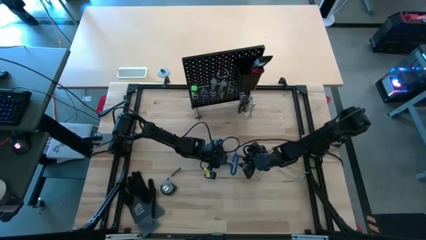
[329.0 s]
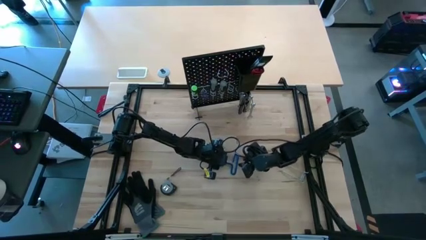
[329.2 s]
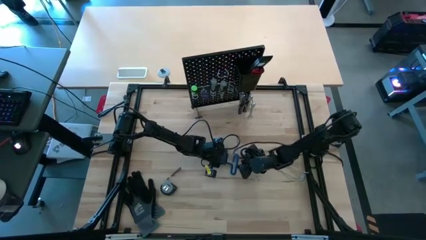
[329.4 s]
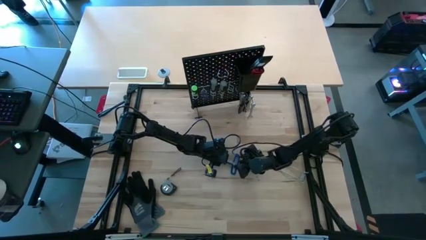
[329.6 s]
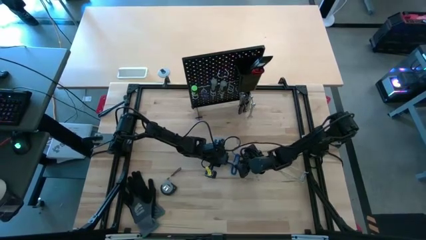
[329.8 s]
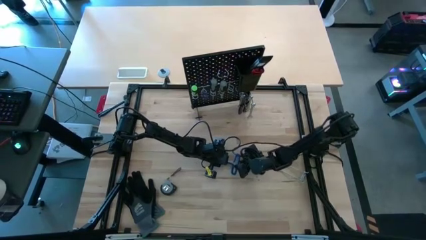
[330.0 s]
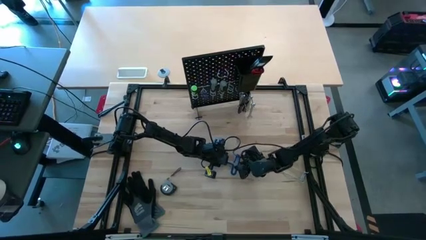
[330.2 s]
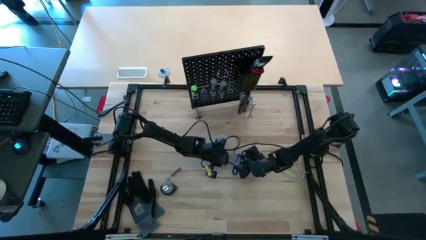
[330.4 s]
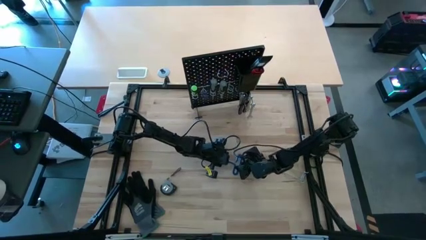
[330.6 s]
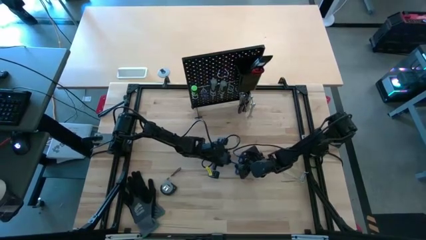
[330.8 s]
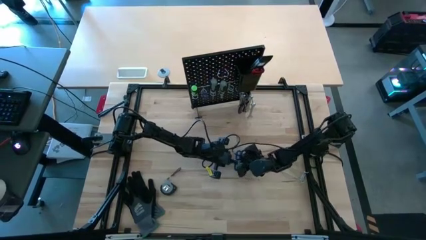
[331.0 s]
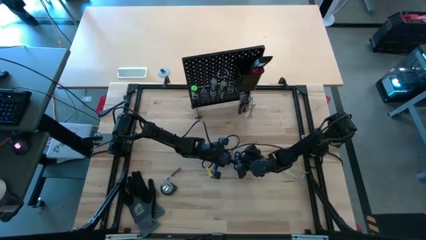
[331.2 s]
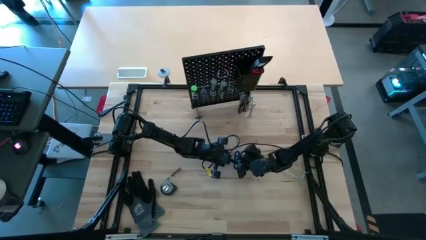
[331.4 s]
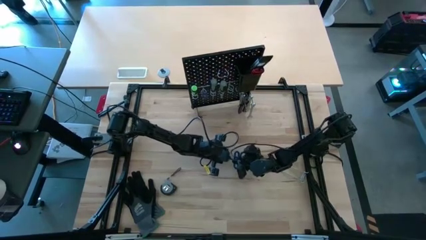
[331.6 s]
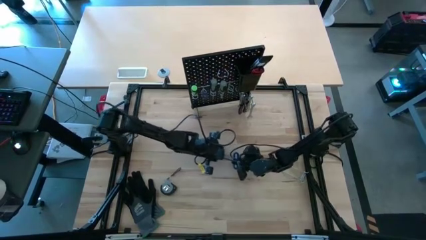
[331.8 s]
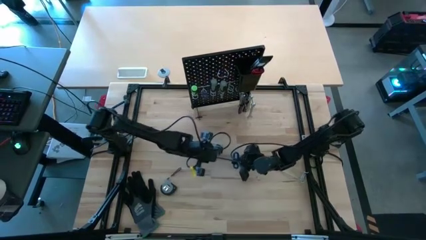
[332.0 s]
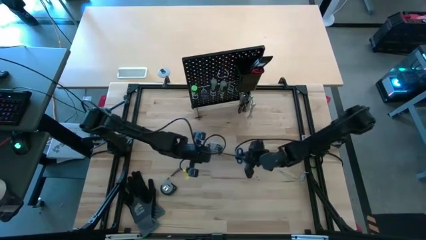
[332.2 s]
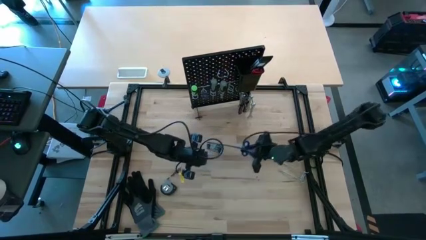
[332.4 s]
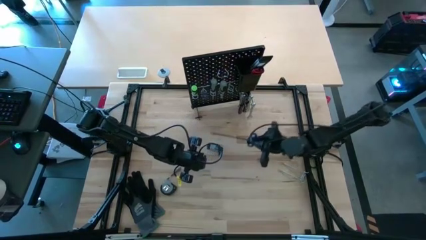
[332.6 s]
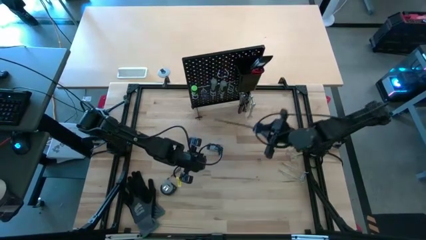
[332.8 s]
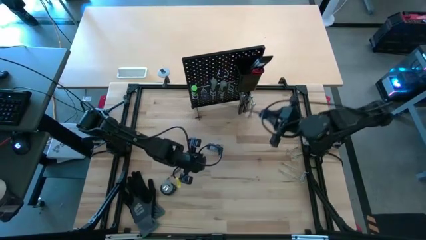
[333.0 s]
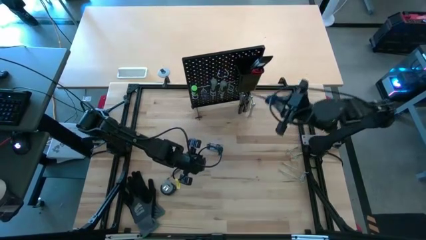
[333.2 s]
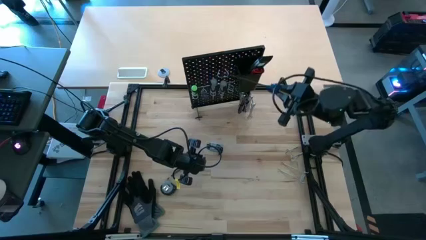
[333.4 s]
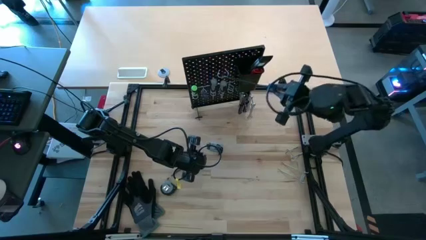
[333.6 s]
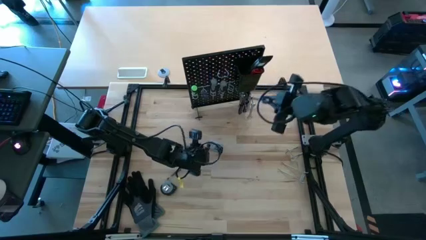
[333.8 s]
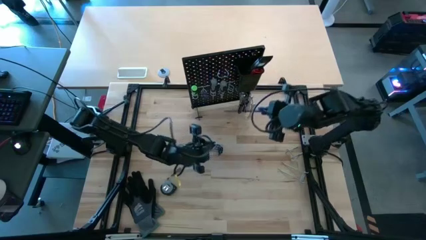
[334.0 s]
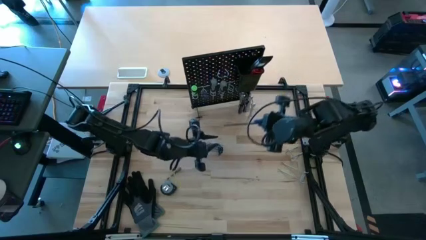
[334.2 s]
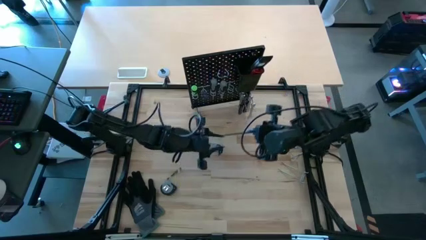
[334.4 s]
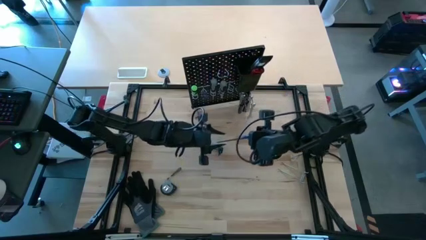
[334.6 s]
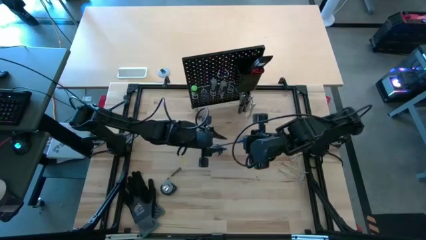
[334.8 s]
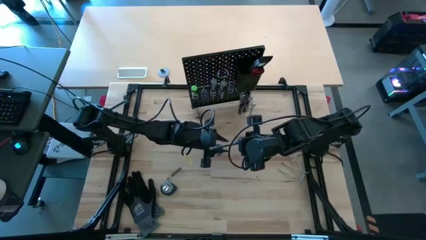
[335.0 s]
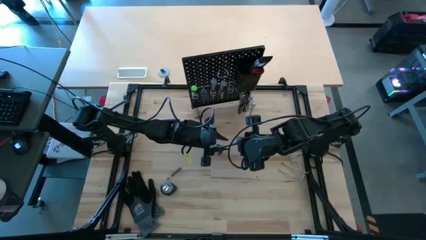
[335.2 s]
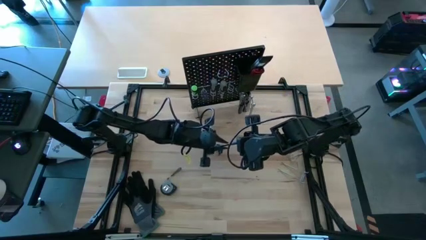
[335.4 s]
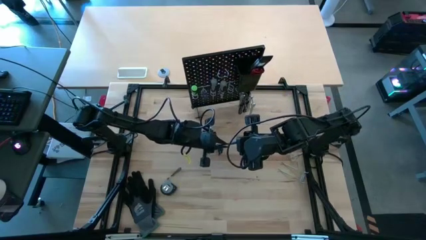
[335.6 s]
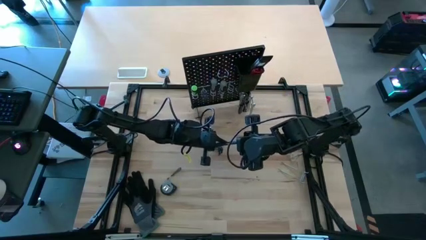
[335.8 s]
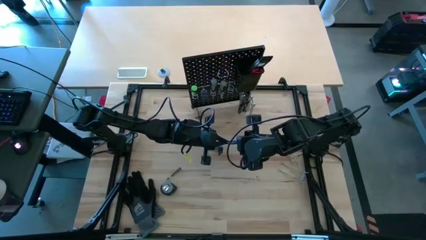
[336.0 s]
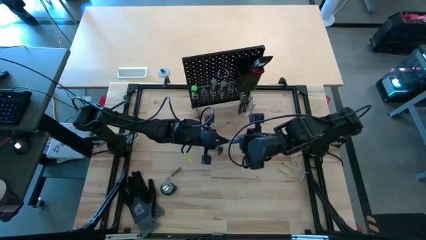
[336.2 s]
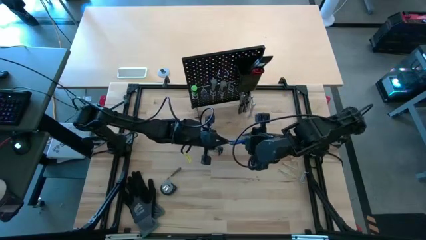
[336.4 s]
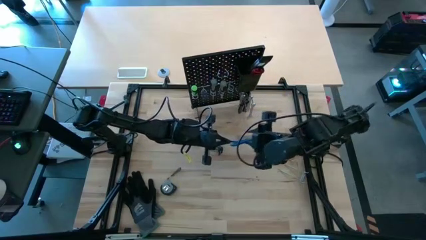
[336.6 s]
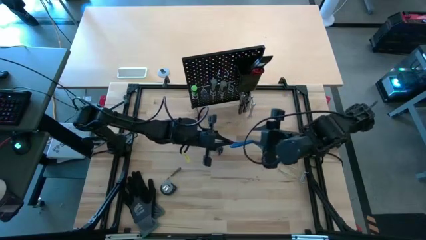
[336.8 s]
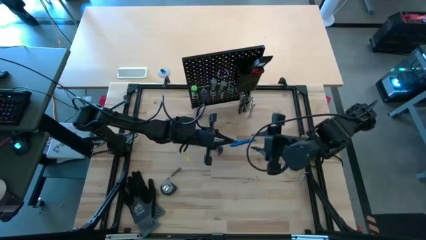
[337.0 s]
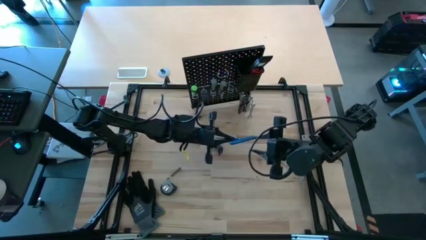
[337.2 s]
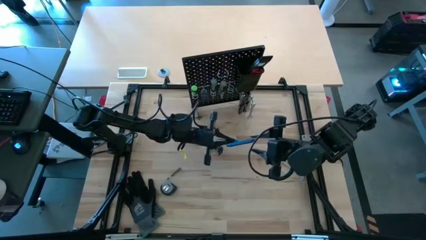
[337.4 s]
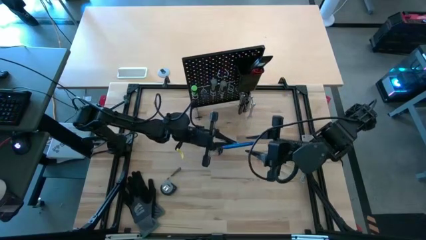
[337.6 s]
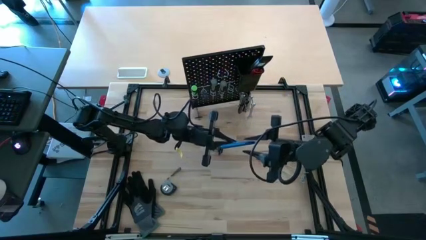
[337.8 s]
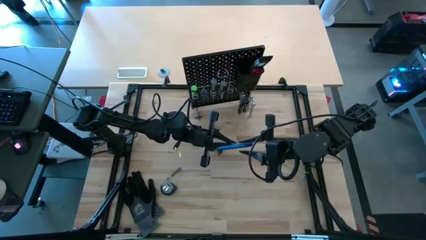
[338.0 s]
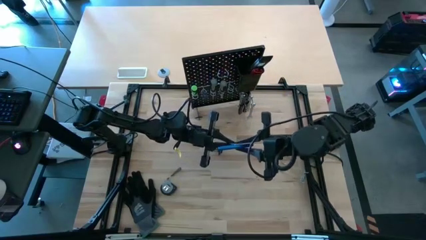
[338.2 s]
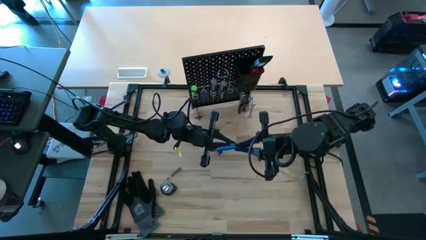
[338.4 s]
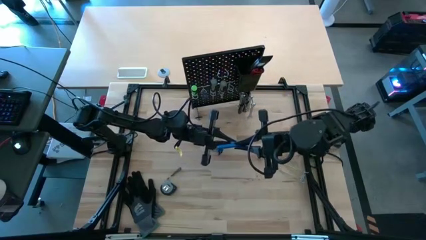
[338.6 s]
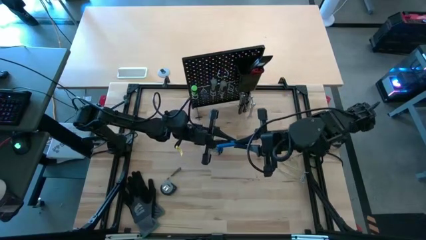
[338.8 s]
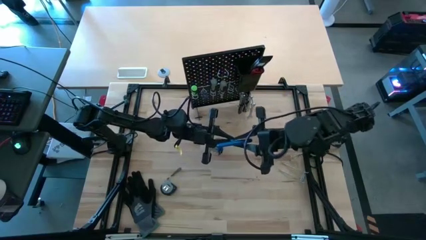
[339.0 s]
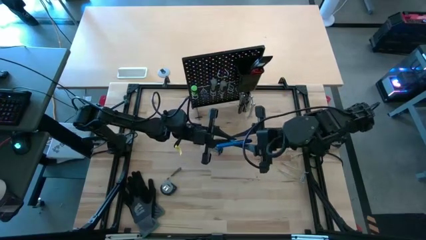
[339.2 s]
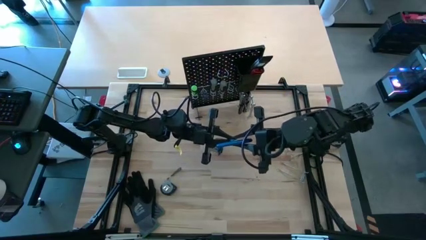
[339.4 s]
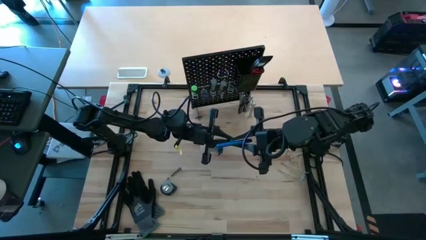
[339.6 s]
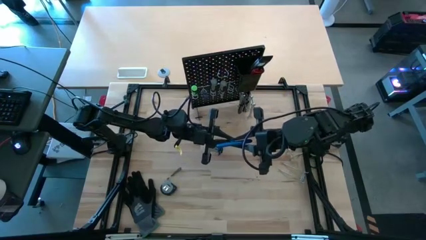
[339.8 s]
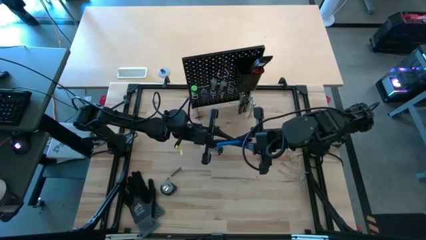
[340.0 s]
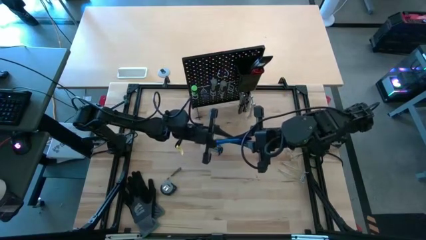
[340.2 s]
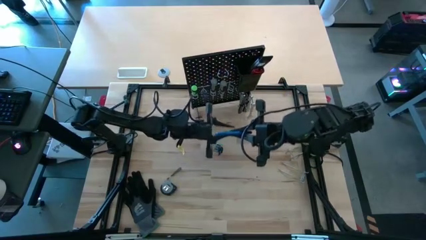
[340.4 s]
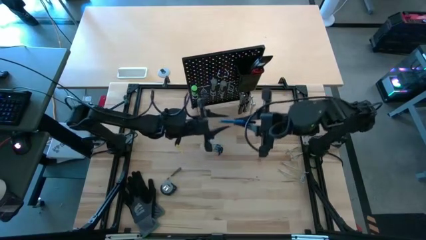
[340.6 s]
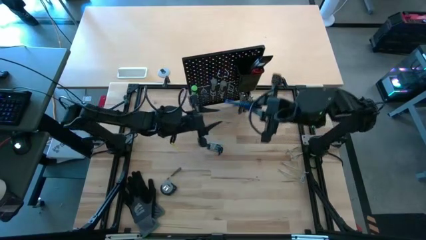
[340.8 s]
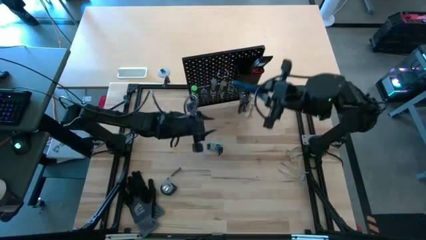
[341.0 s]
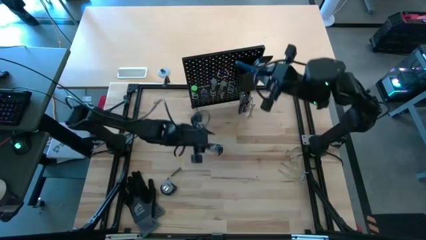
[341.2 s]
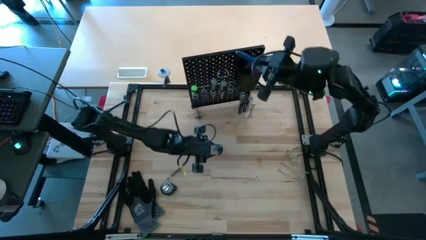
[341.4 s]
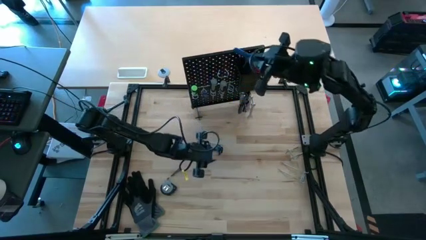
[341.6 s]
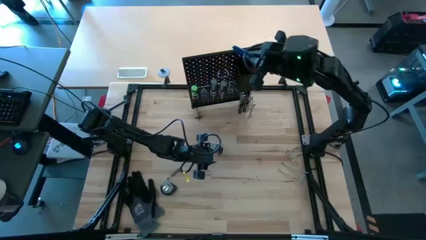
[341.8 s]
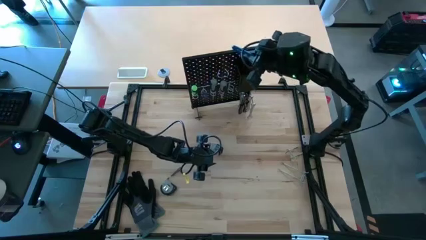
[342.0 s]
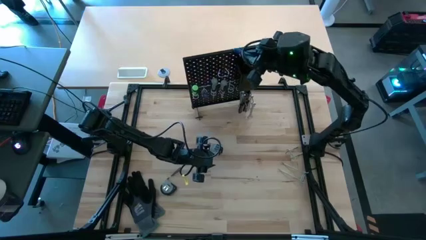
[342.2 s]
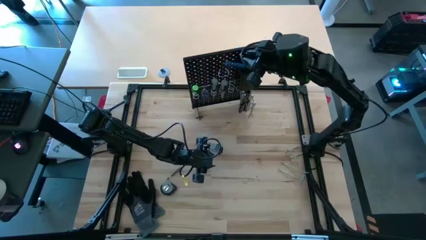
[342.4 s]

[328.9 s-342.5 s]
Task: Hang tools onto peg board
Put the blue t-handle hex key into the pegboard bin

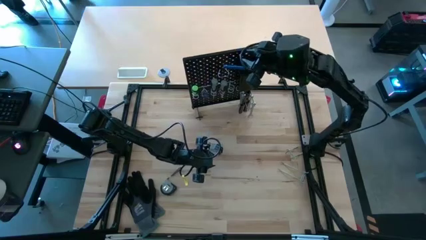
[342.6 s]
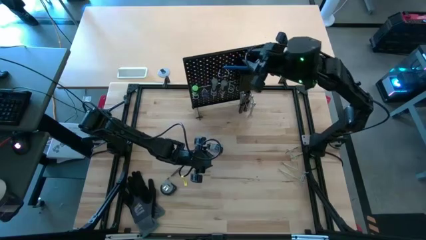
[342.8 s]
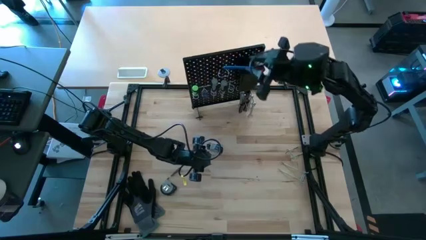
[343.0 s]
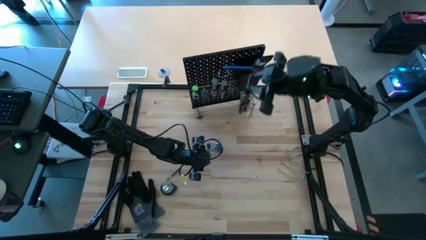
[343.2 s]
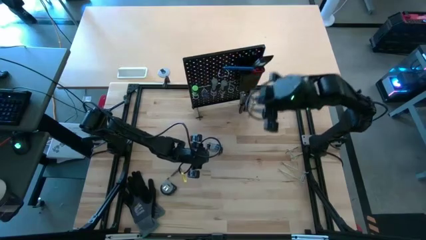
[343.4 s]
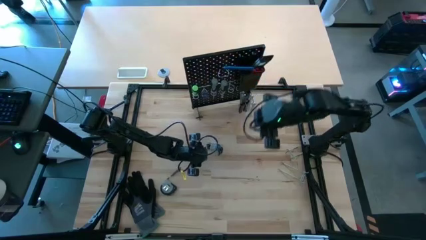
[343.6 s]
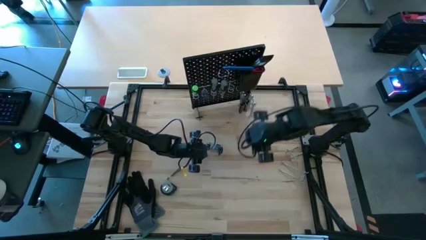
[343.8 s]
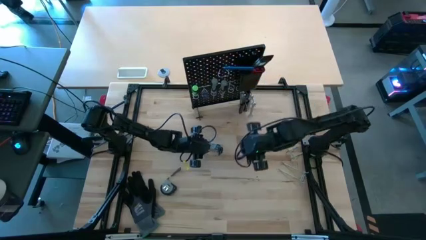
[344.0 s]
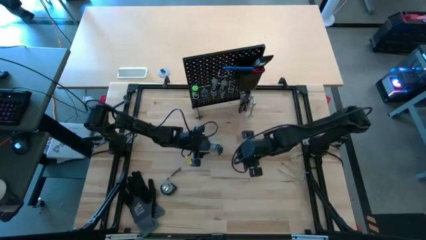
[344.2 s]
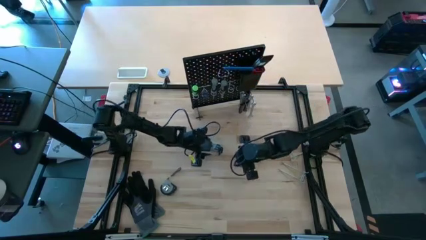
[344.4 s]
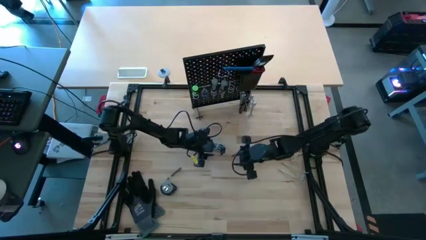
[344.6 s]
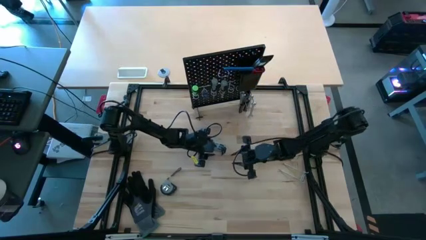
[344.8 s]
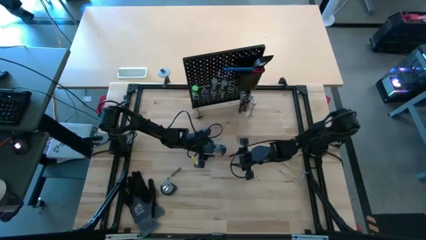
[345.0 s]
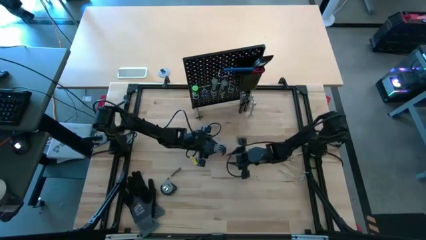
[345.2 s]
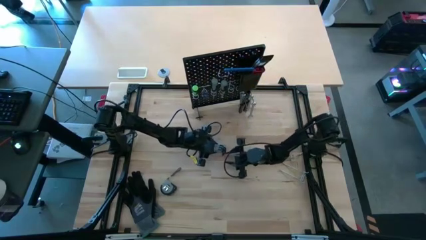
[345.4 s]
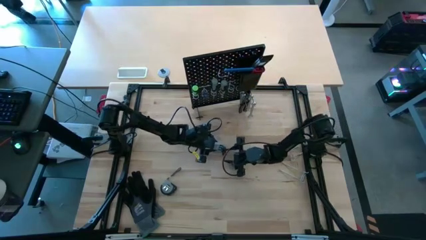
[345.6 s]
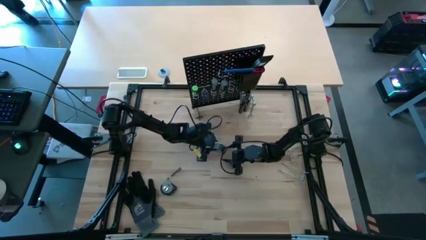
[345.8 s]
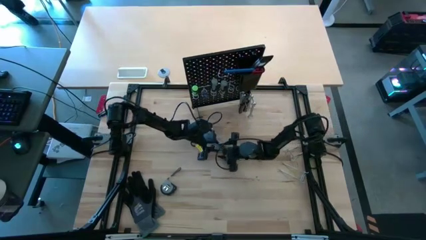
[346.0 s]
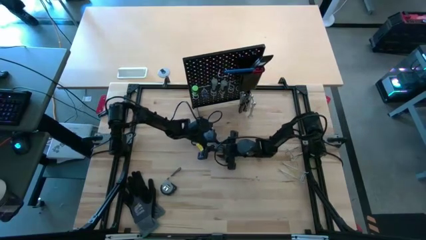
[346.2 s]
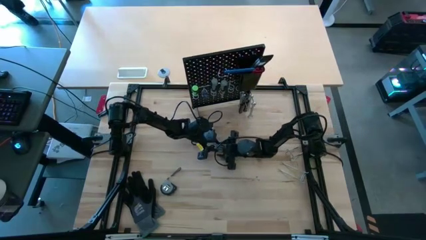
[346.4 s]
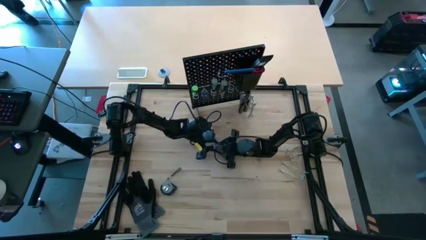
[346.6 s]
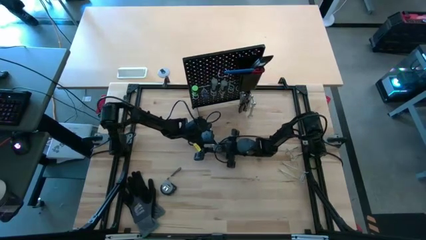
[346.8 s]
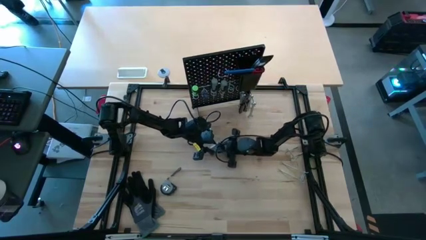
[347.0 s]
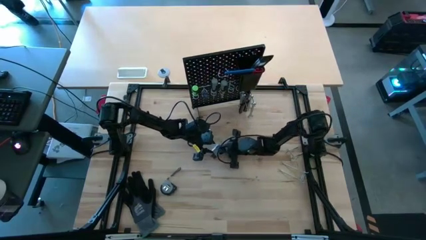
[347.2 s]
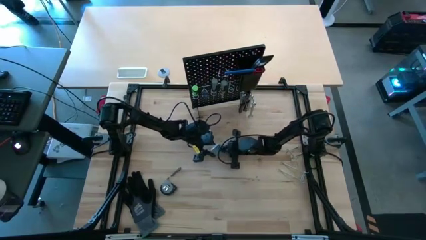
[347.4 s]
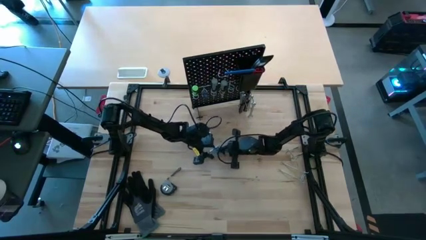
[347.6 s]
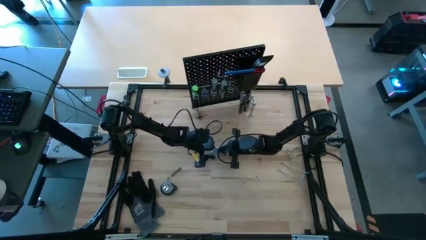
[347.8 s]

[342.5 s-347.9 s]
Put the allen wrenches into the pegboard bin
